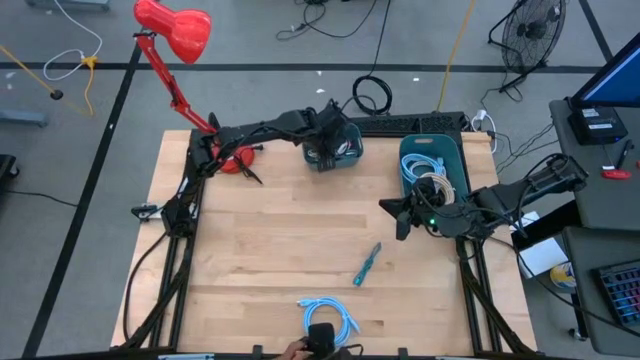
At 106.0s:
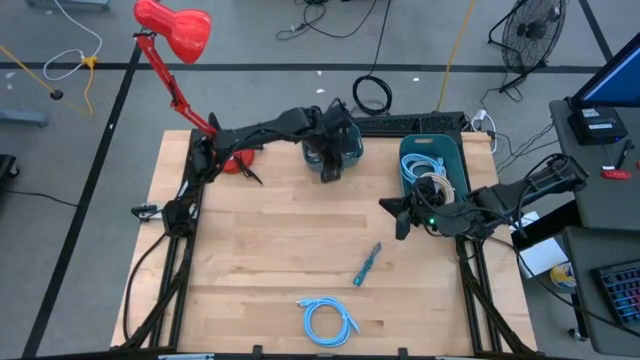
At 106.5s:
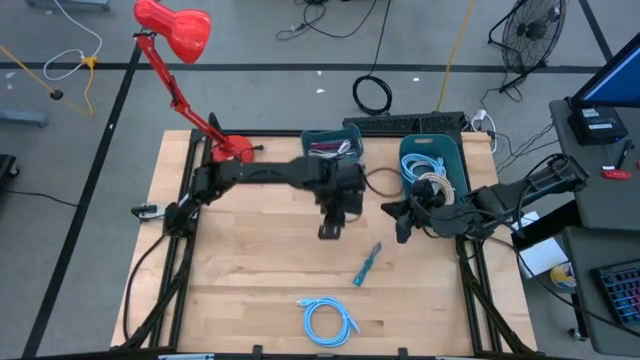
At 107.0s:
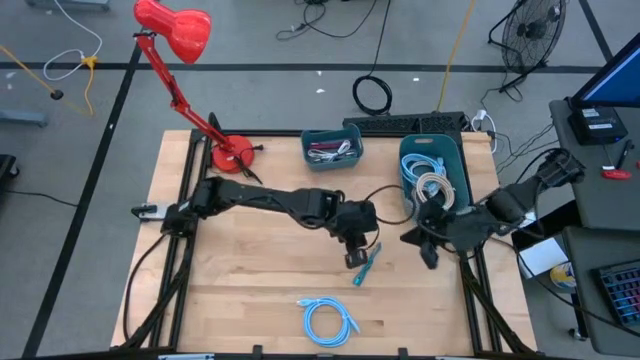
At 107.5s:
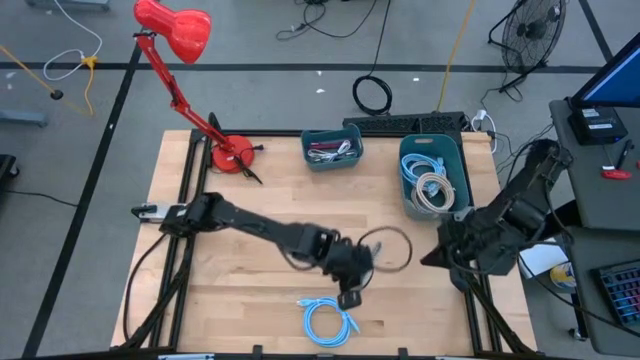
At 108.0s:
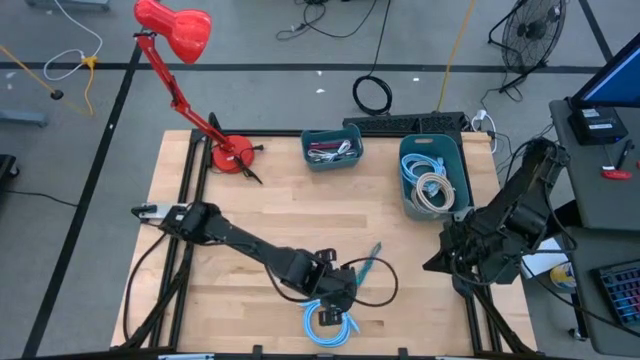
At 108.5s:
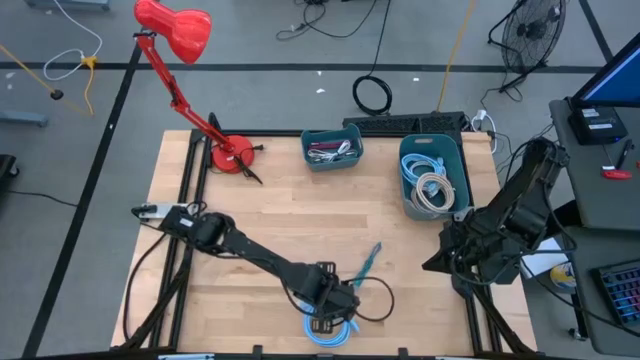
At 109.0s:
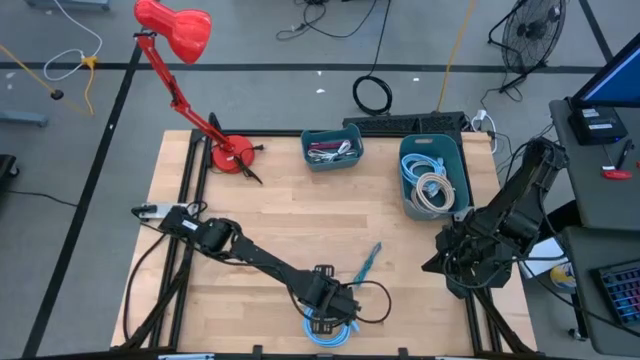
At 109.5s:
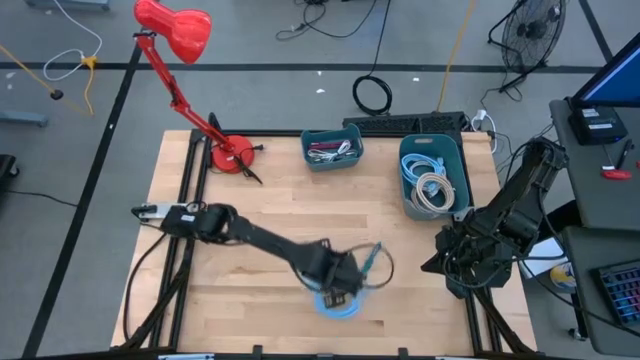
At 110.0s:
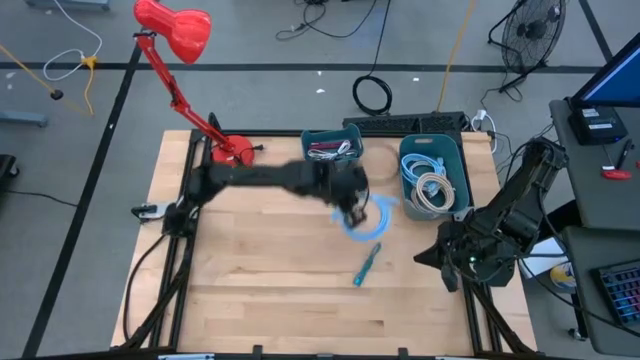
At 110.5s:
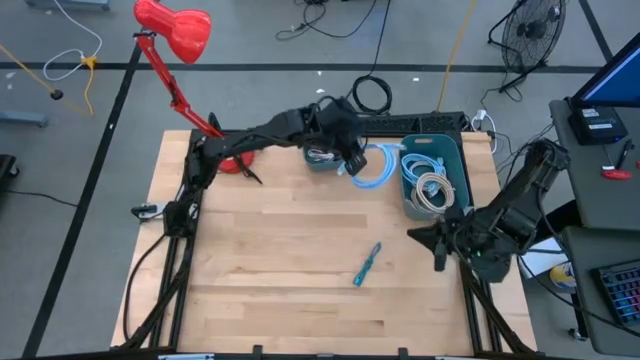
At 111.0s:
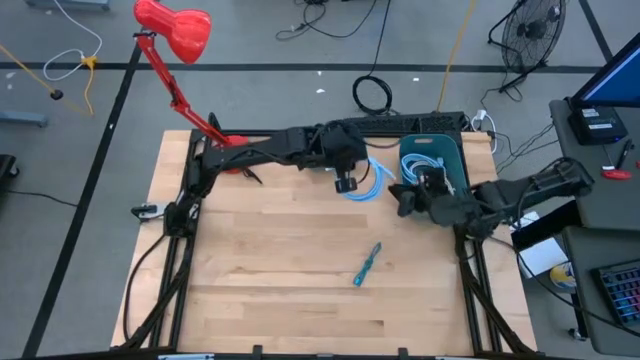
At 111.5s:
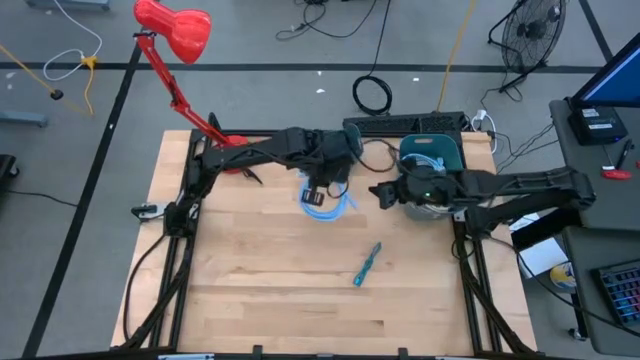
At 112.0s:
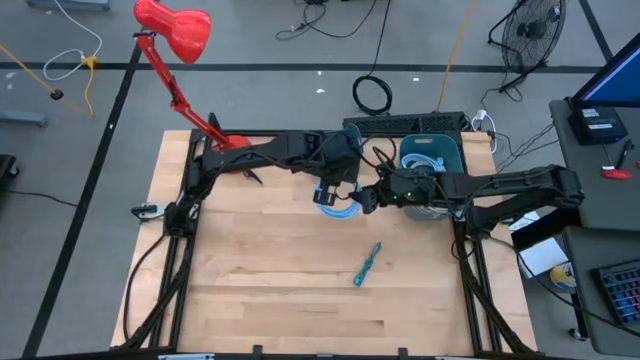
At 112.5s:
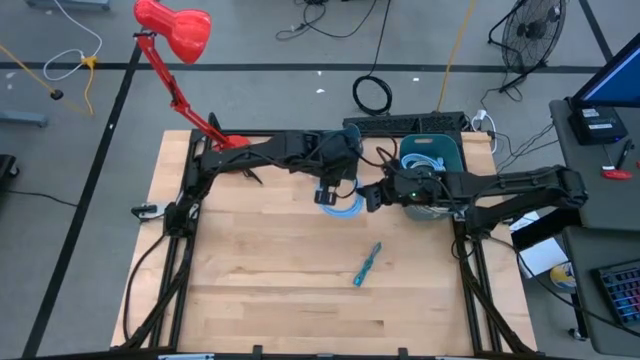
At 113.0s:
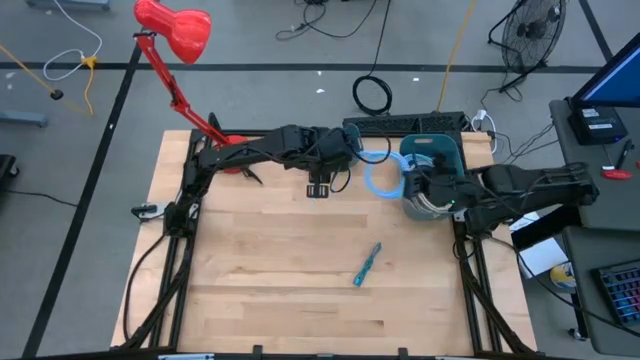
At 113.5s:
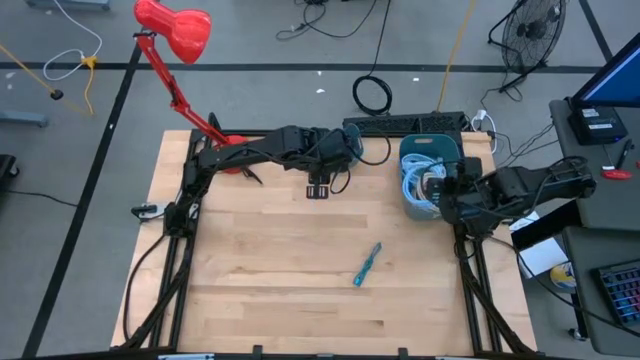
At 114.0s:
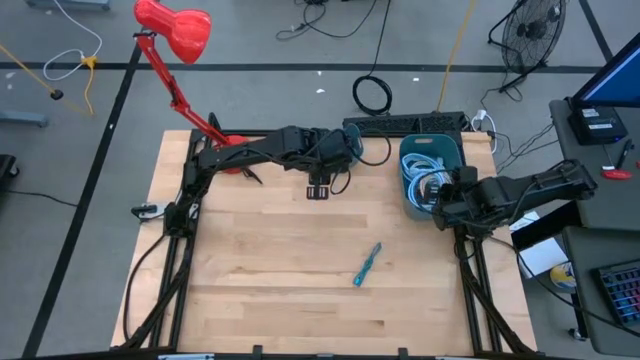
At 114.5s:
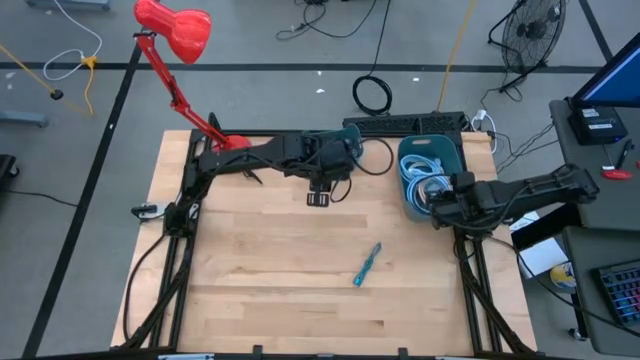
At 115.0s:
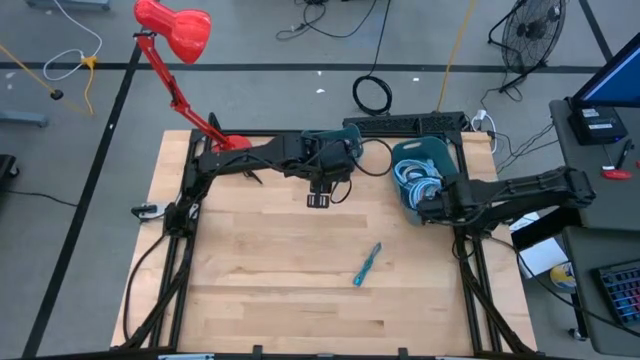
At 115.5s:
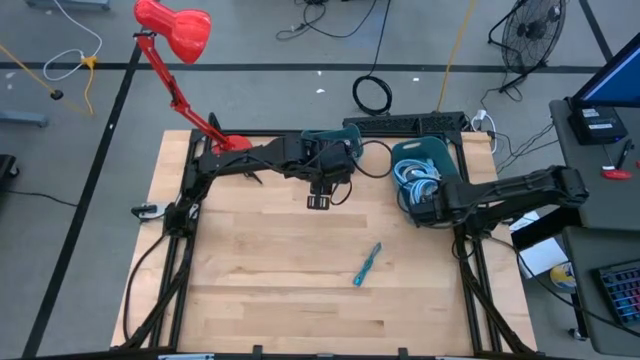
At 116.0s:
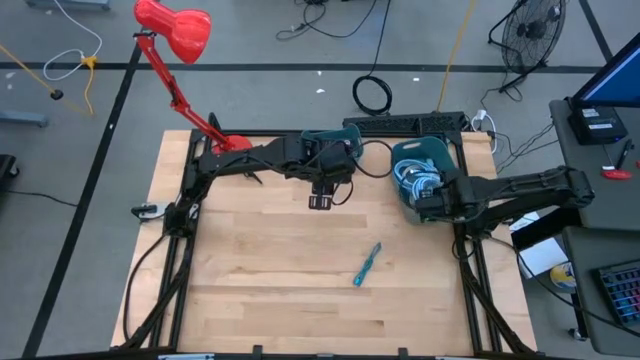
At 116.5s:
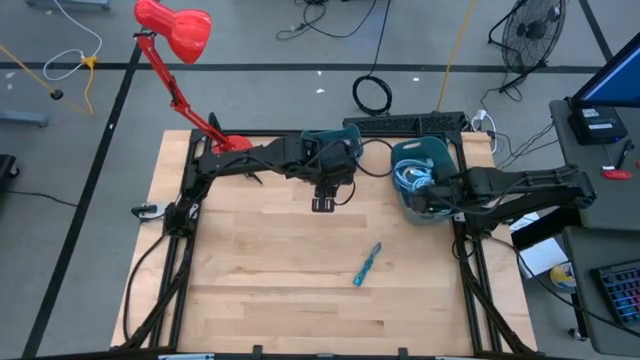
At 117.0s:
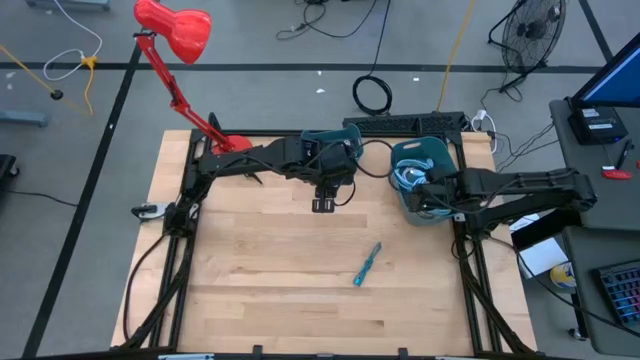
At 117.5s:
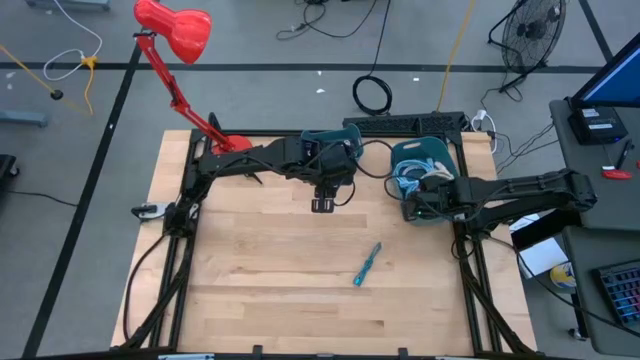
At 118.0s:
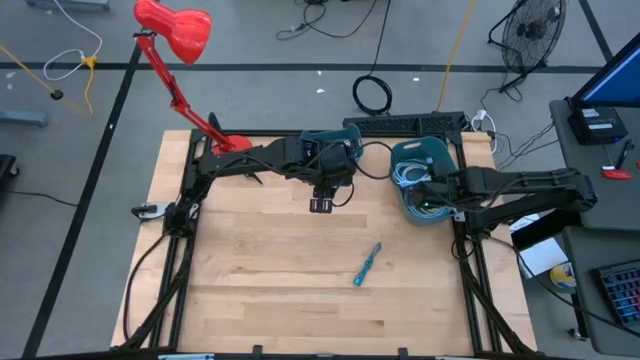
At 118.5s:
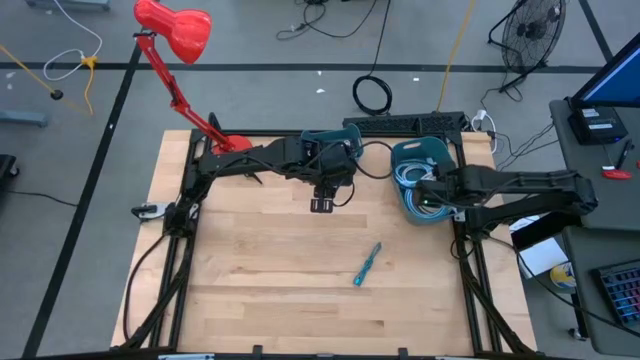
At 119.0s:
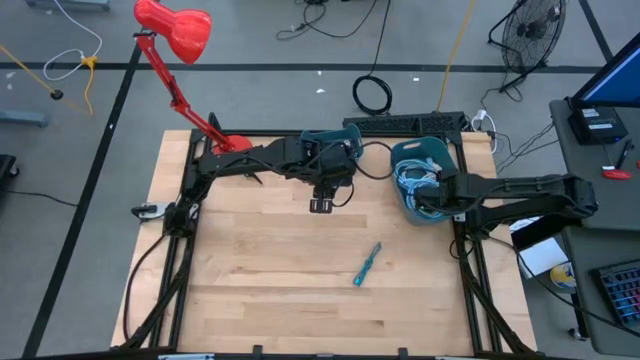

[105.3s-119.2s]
Task: Pick & Place USB Port
Put the blue HDMI cable into the right blue bin

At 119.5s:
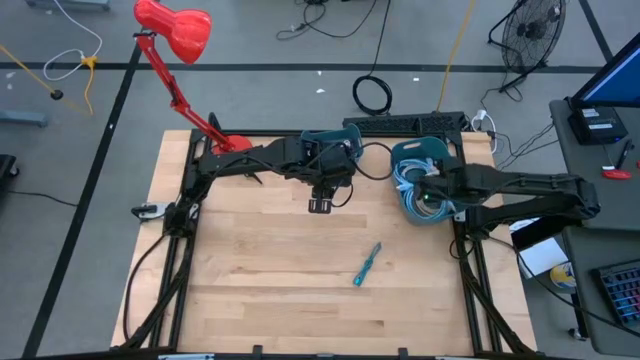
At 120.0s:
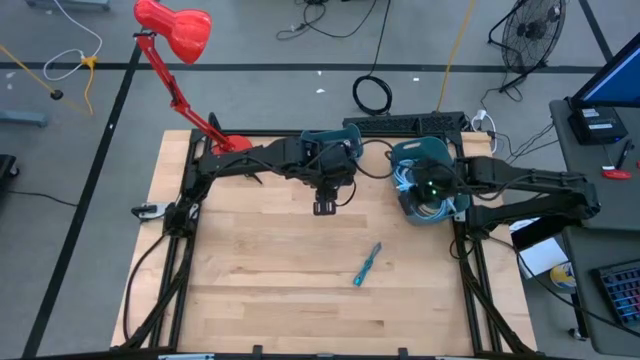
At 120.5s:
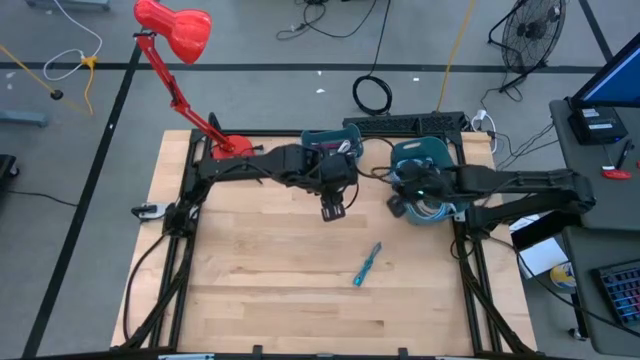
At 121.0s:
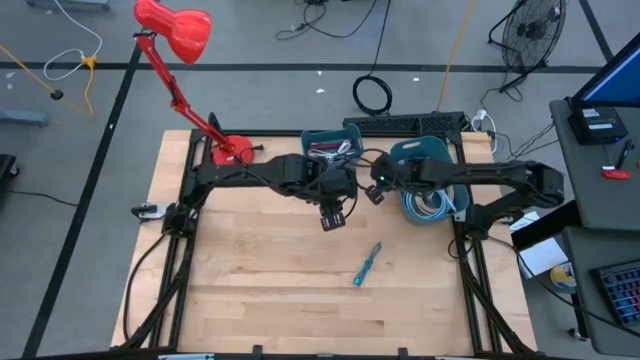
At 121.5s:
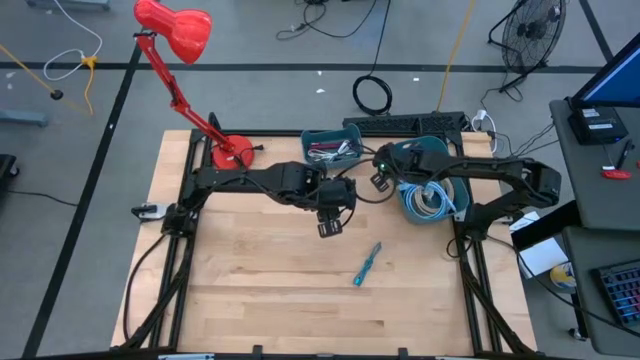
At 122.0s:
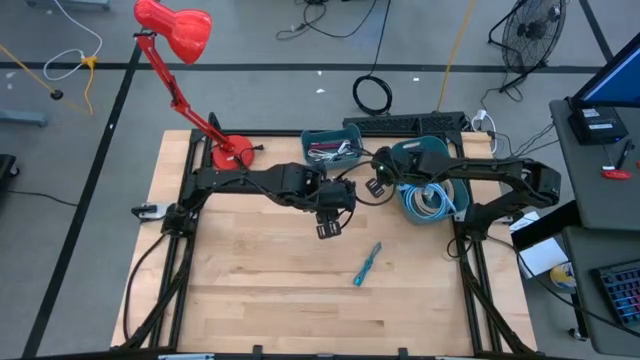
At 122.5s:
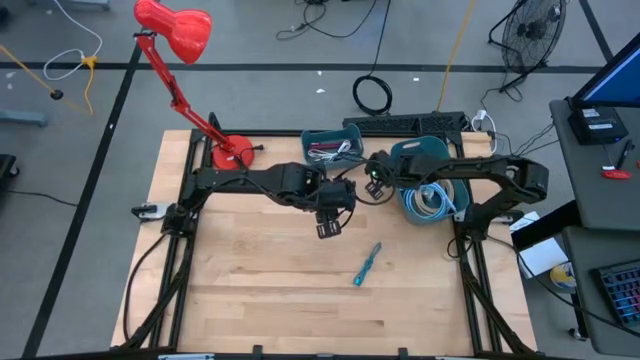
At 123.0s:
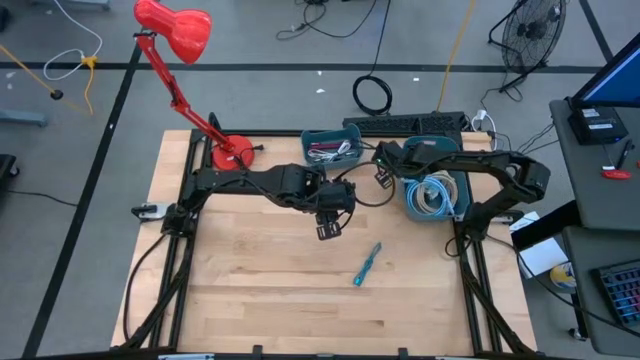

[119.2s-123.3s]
Adjust the right blue bin

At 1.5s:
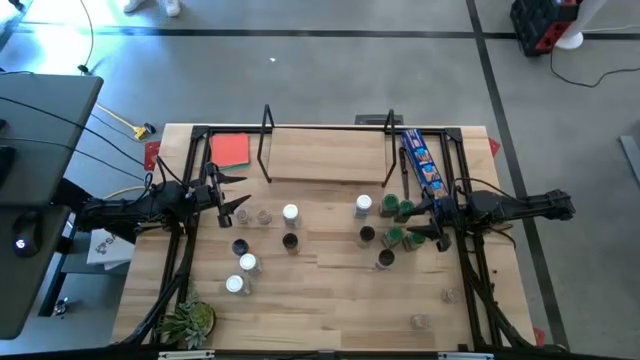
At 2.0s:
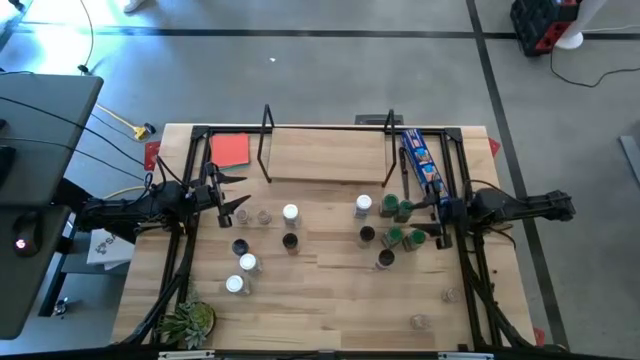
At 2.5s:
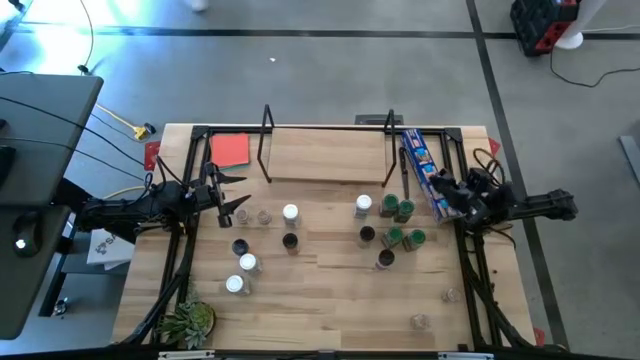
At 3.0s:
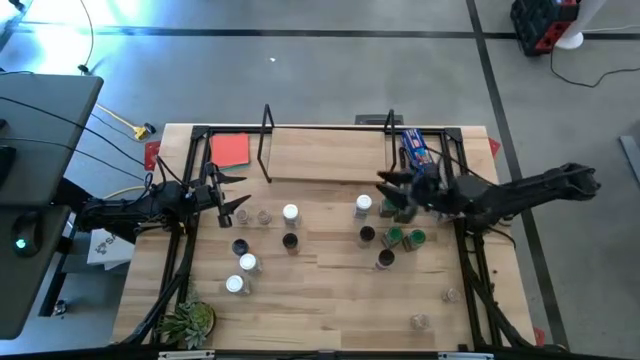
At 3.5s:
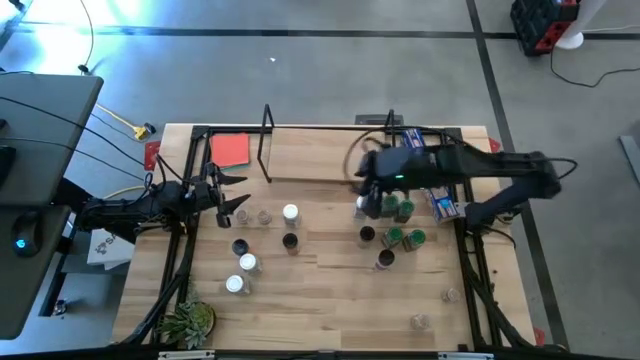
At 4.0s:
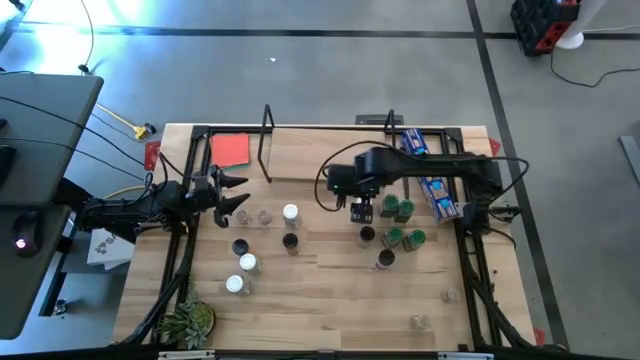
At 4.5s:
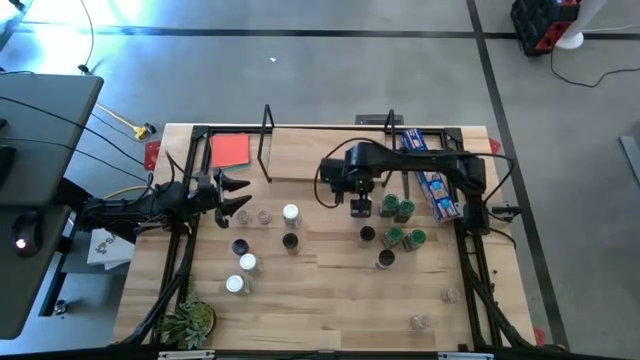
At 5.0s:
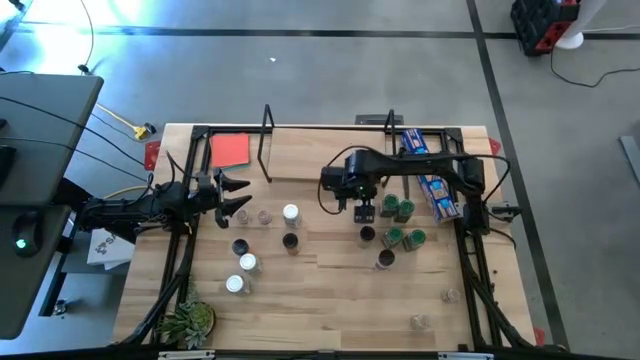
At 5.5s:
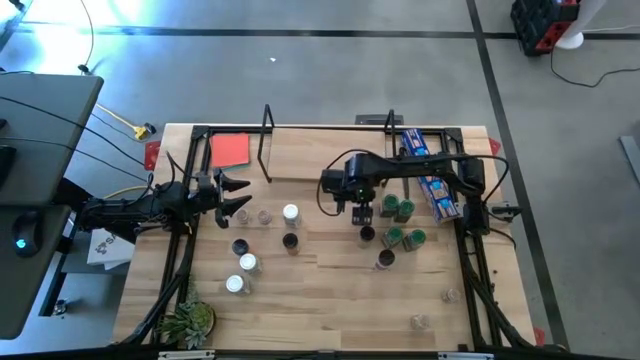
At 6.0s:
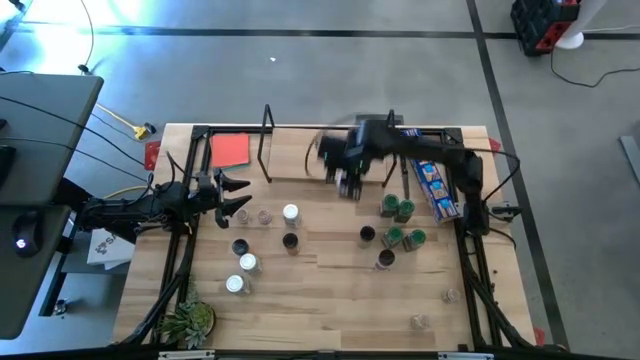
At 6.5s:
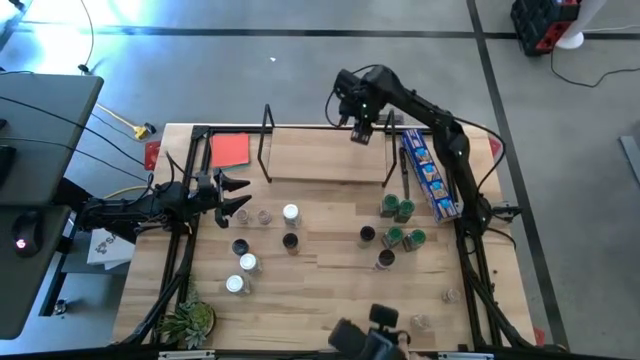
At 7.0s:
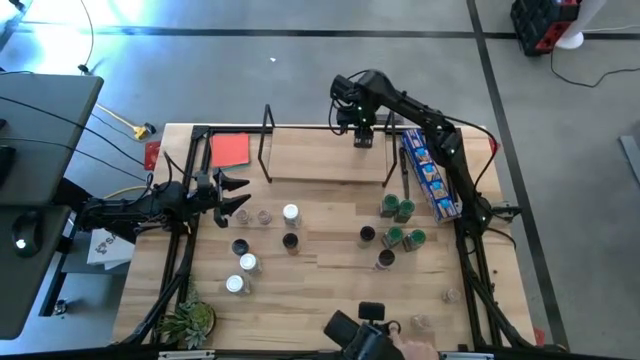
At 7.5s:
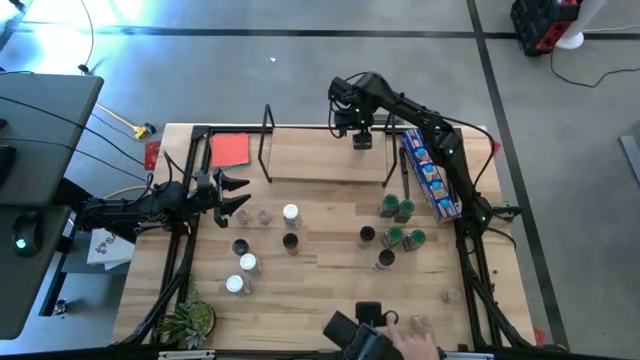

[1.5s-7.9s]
Task: Shelf spices
Put the top right white seasoning bottle on the shelf
